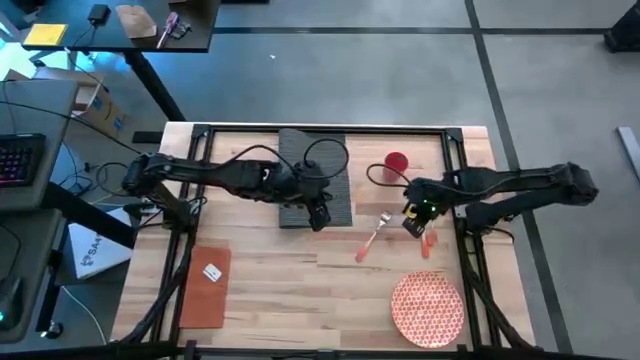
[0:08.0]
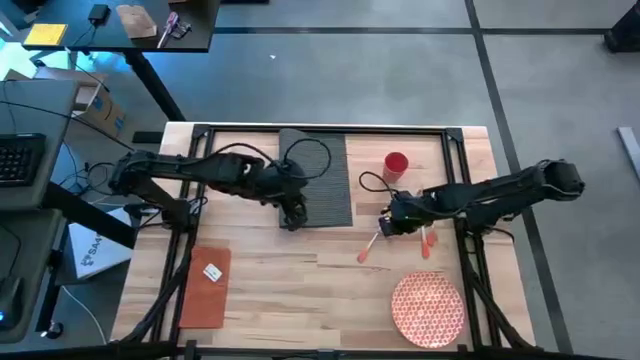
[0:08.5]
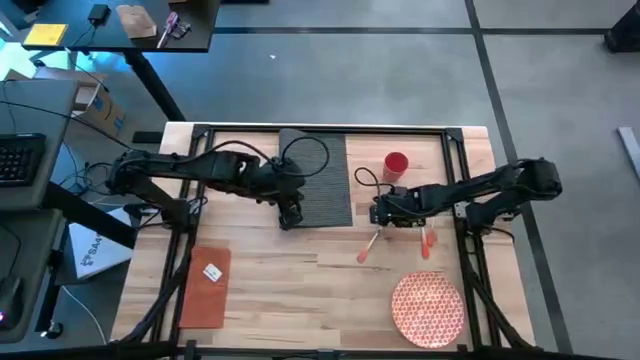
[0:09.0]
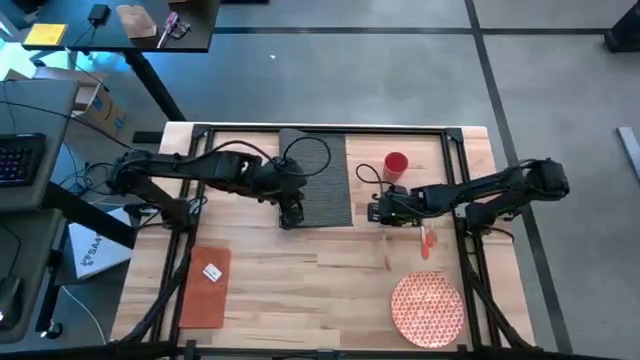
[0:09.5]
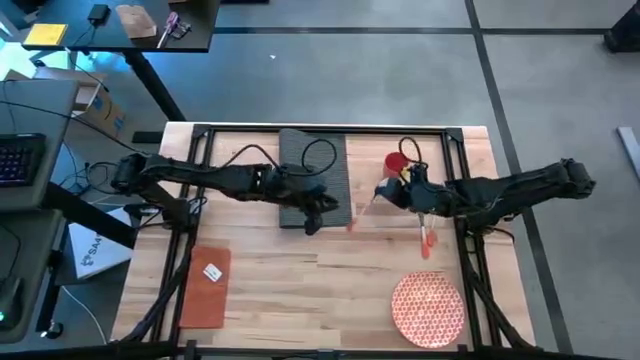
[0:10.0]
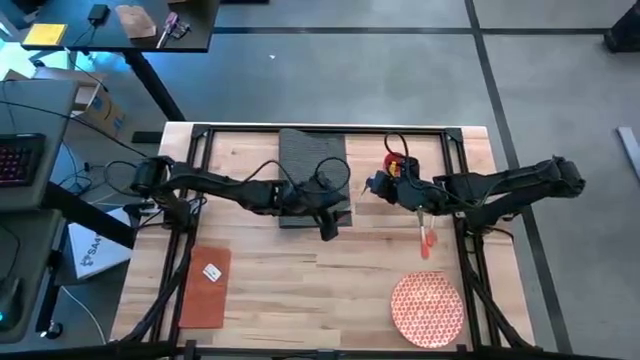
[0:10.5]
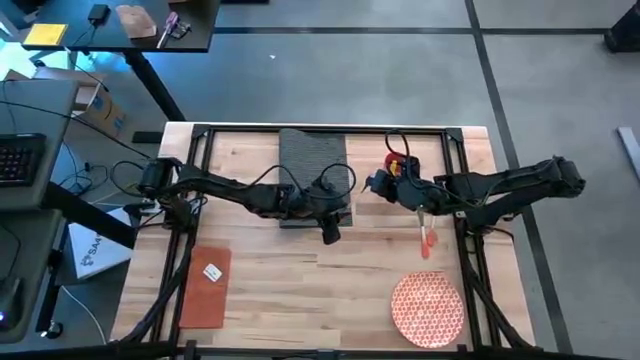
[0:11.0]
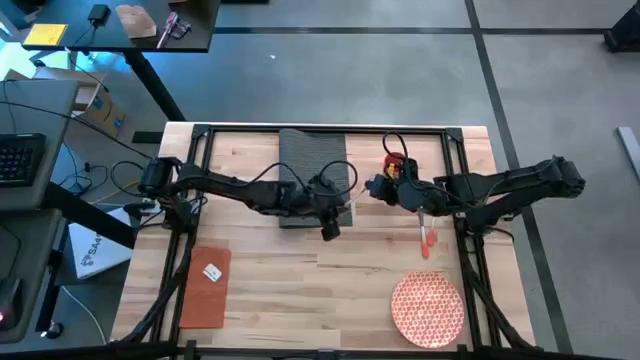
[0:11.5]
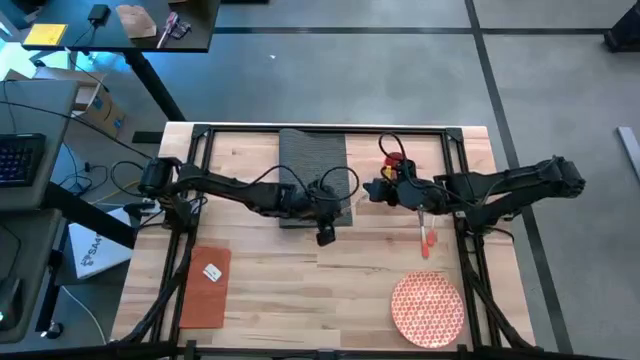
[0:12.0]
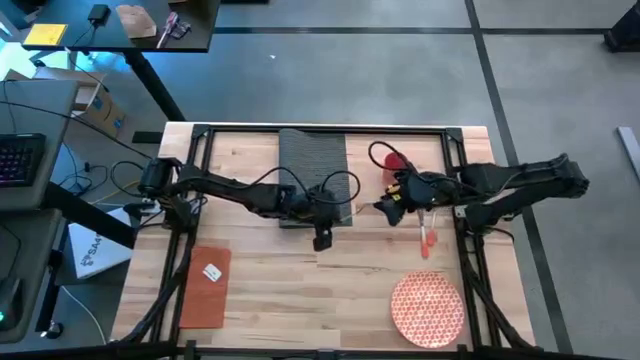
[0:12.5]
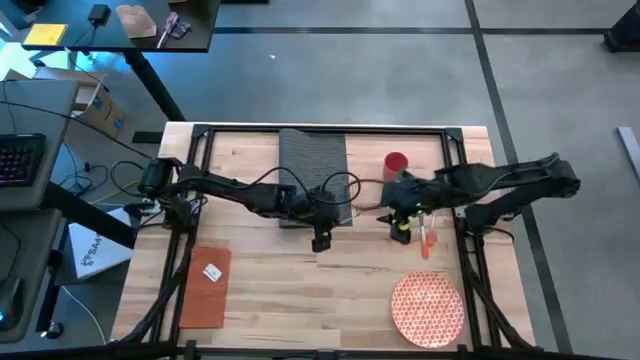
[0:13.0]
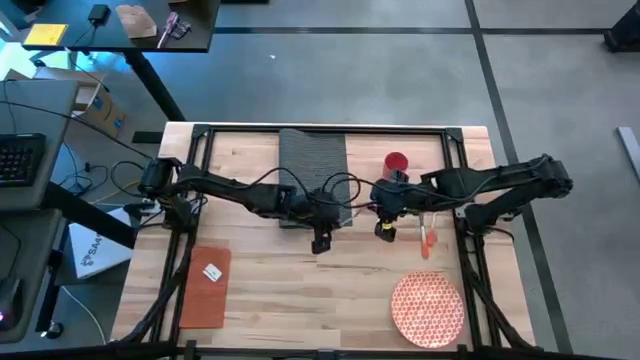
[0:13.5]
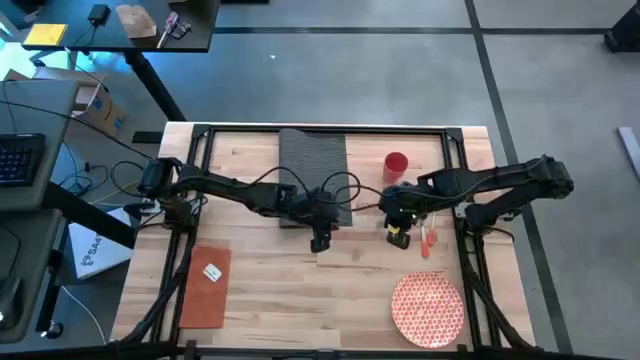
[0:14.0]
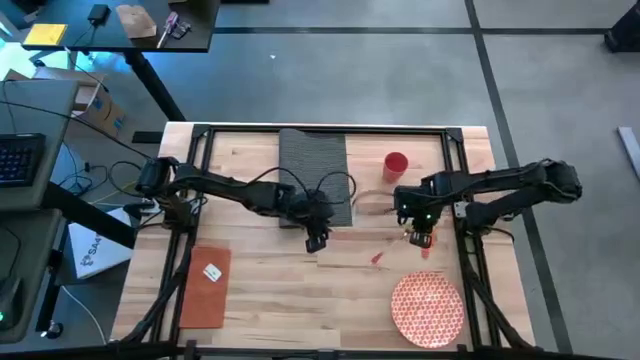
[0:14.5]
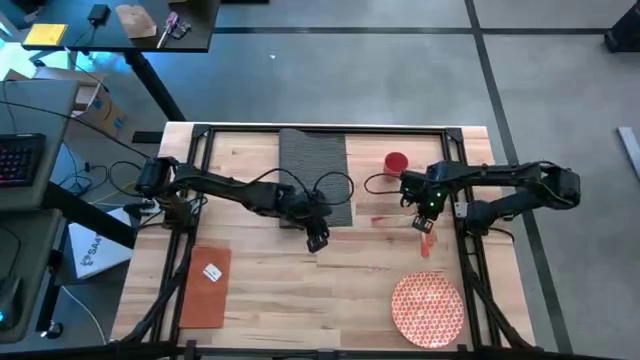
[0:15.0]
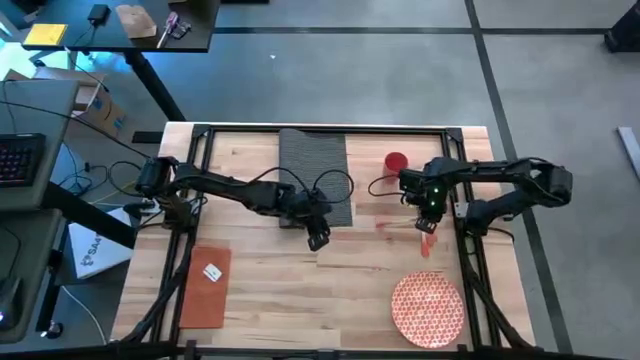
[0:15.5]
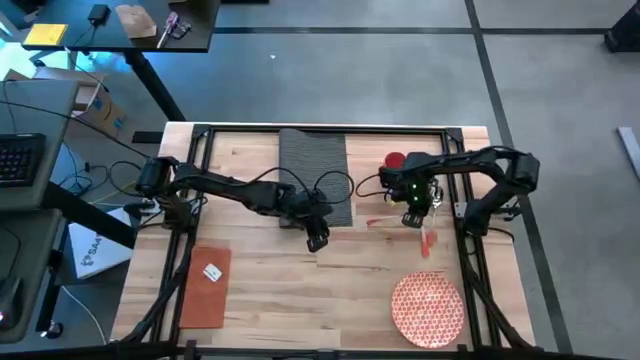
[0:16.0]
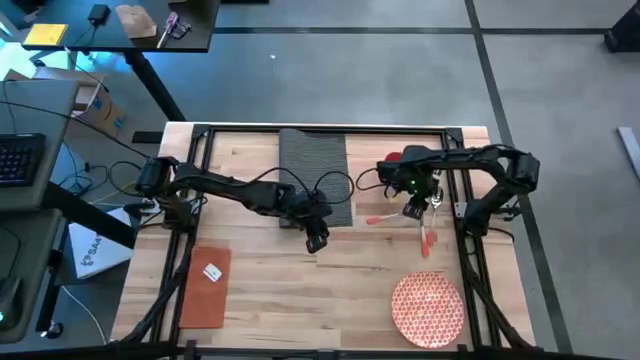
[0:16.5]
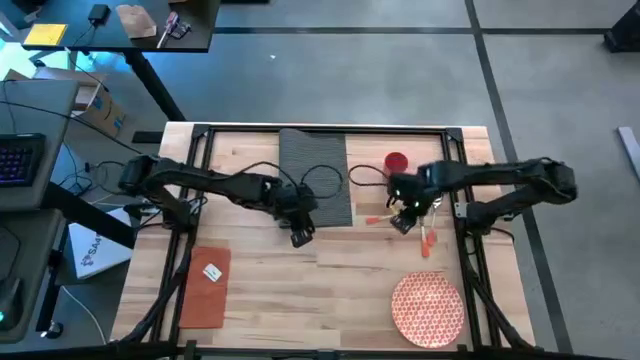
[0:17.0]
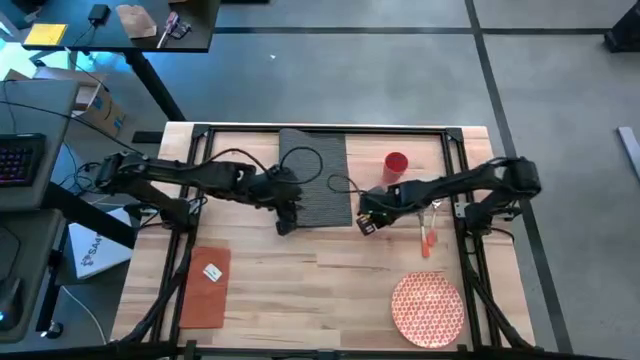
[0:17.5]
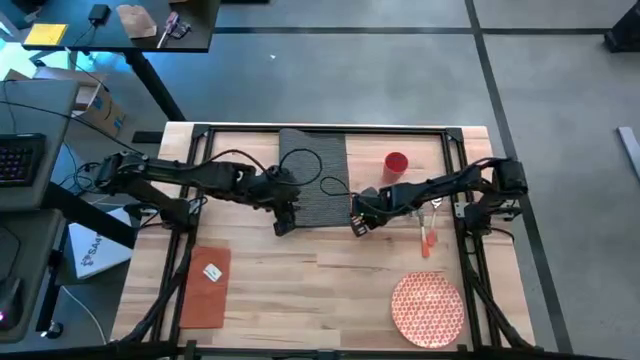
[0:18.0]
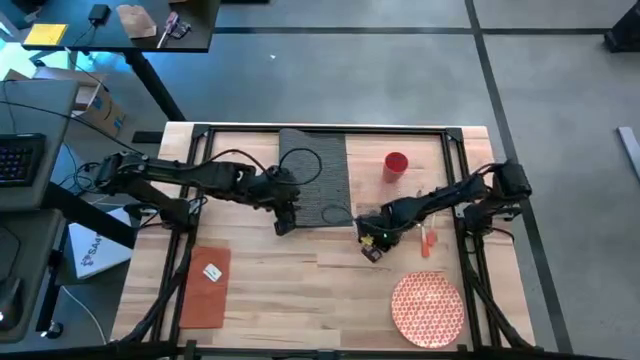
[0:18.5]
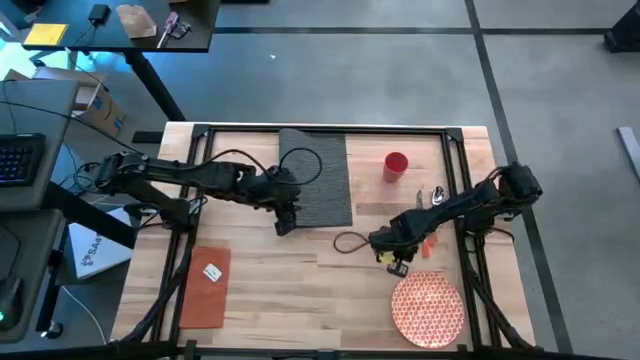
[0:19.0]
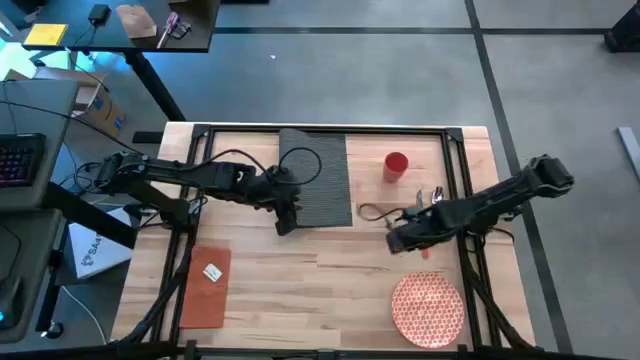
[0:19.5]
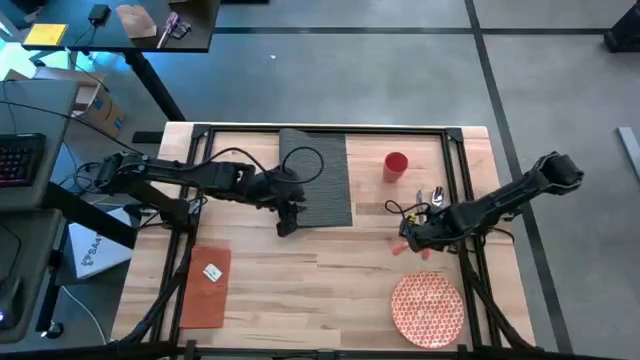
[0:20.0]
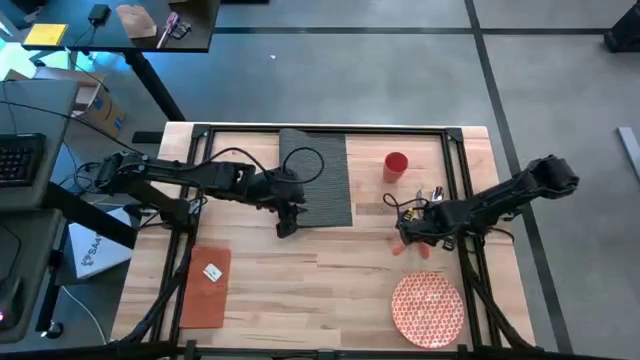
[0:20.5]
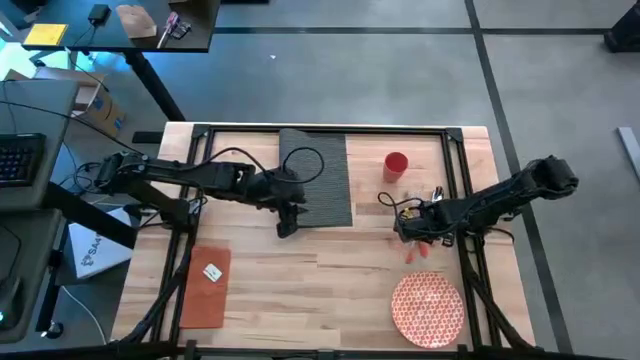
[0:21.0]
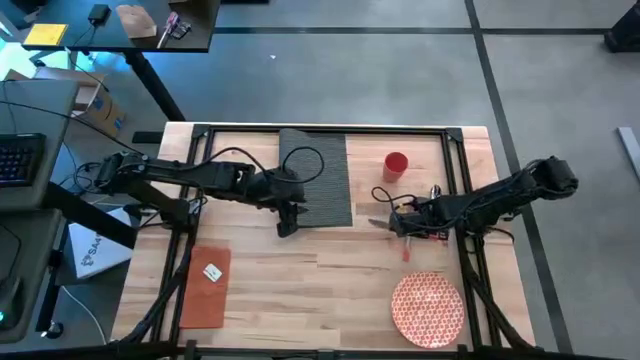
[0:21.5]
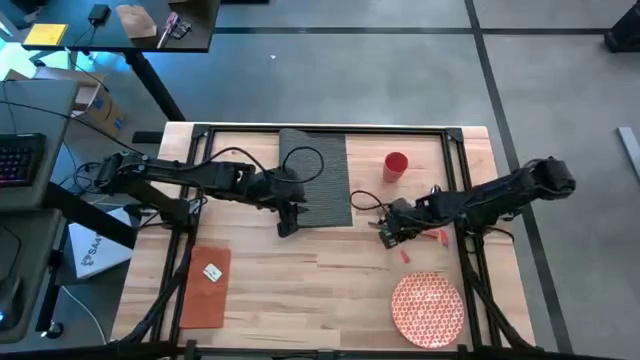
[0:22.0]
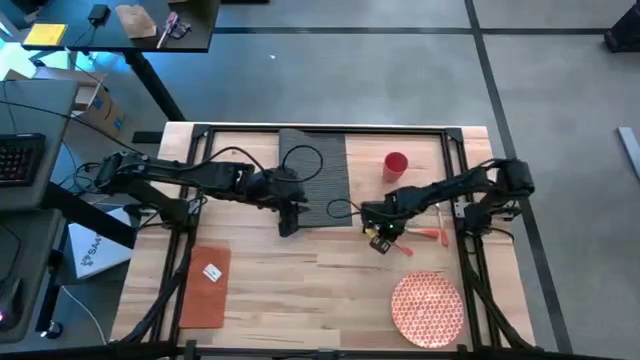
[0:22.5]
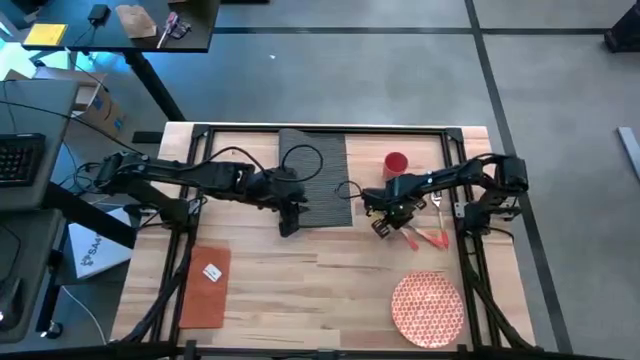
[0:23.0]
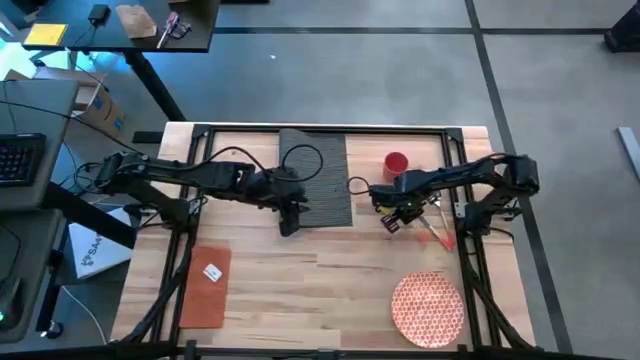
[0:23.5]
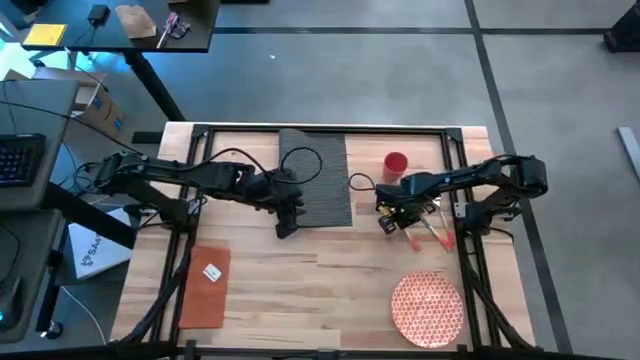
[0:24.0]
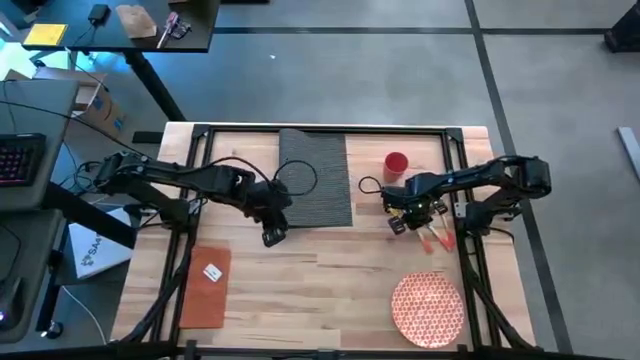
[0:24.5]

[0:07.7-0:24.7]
Task: Set table place
Move the orange fork from the upper left to the middle right of the table

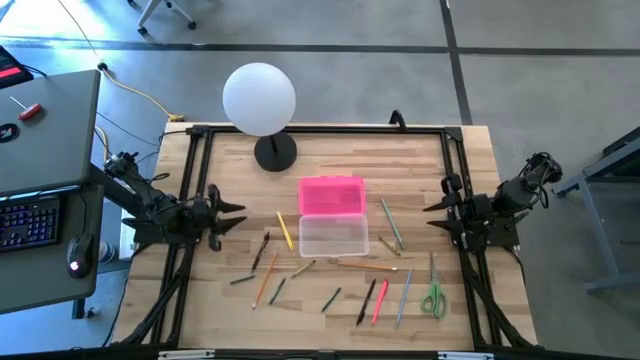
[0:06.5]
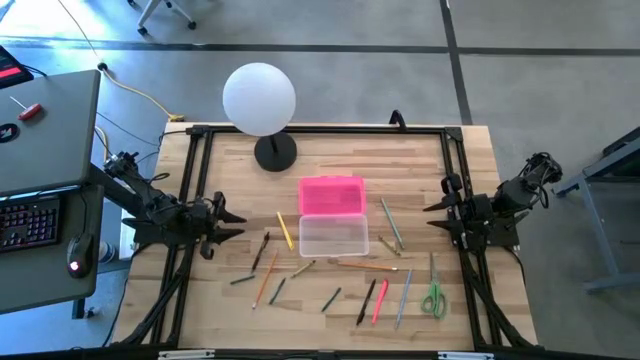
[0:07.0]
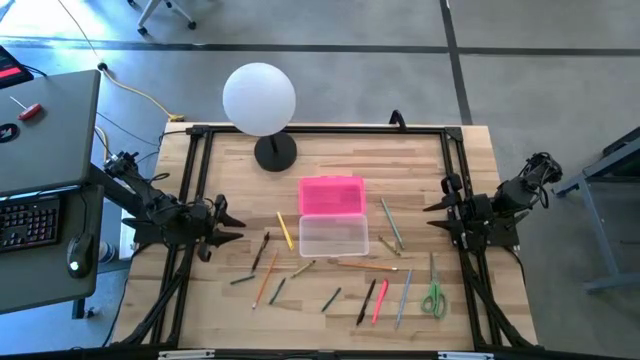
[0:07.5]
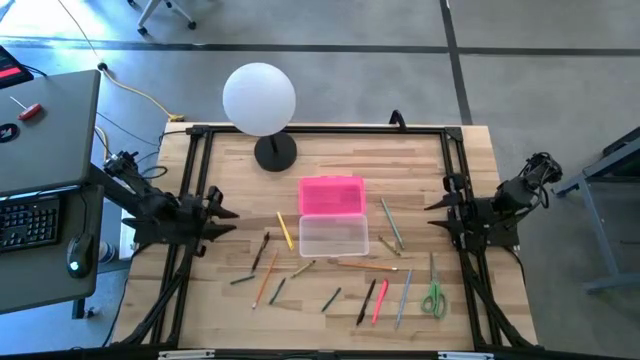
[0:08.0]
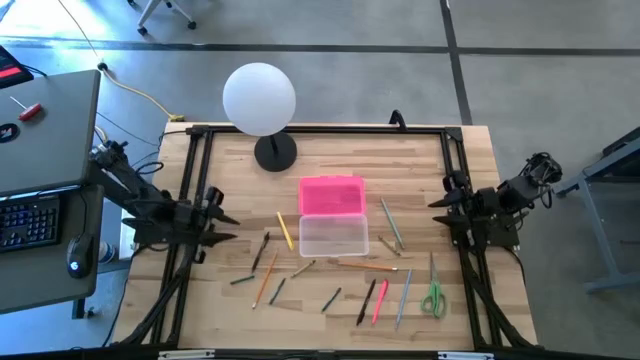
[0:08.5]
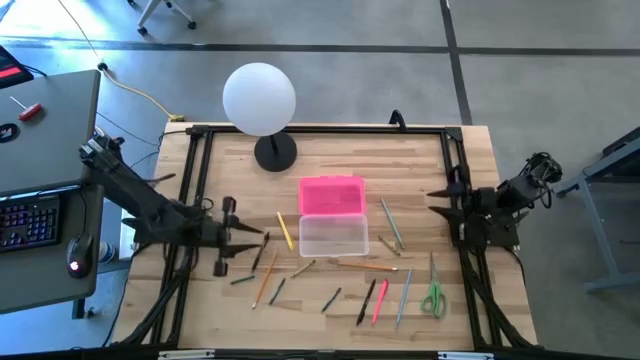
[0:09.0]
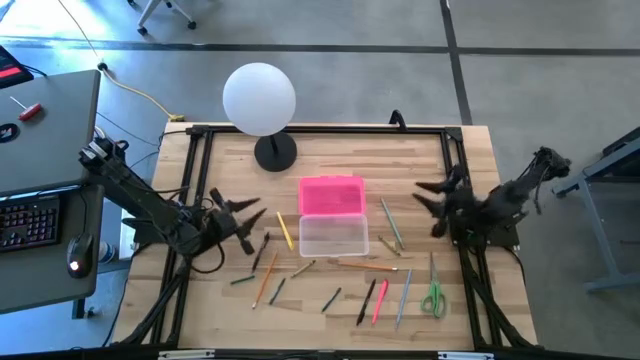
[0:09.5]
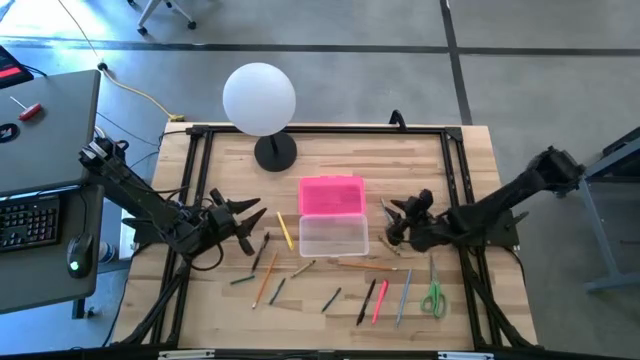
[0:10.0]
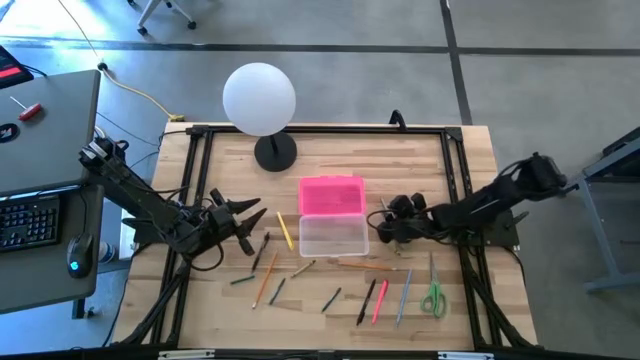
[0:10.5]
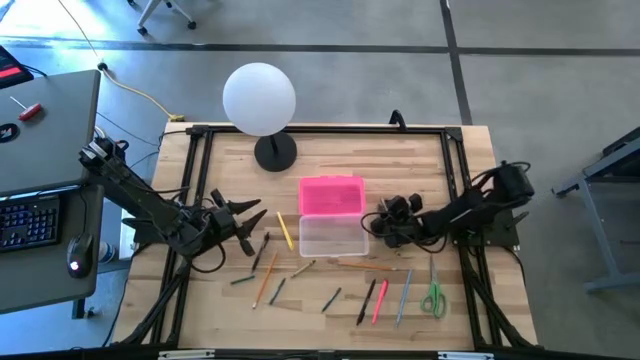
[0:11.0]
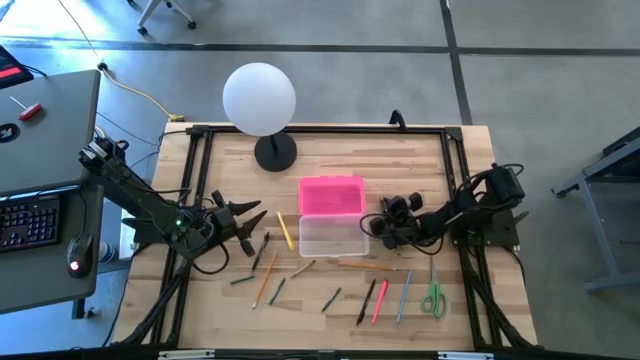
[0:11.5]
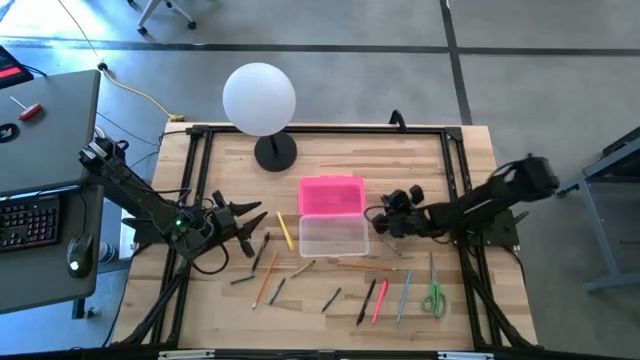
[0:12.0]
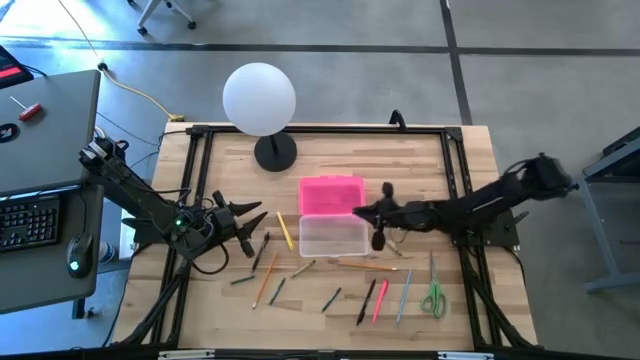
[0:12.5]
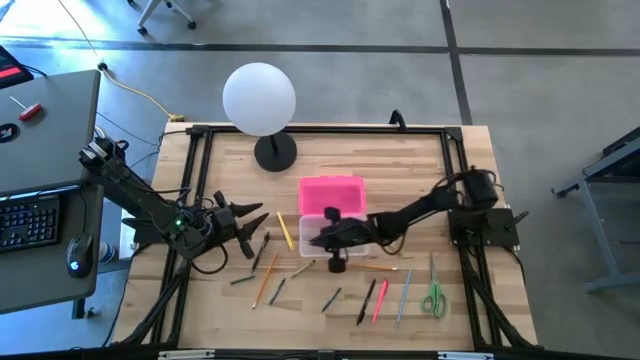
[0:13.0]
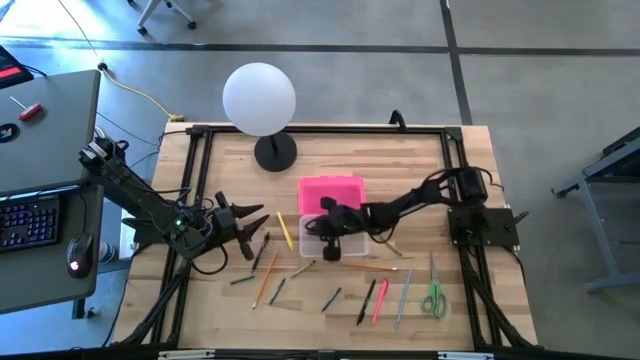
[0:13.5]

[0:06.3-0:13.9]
Task: Pick & place school supplies into a supply box
Put the blue pencil into the pink supply box
